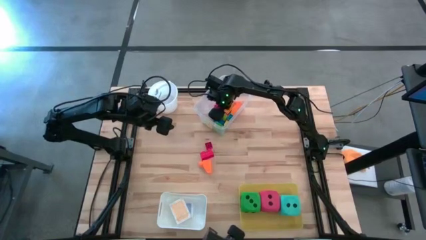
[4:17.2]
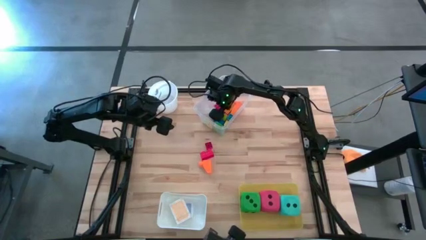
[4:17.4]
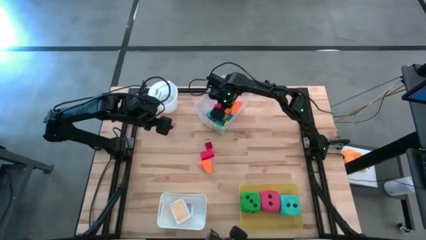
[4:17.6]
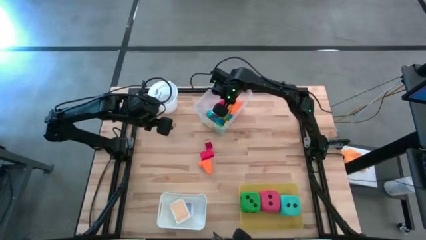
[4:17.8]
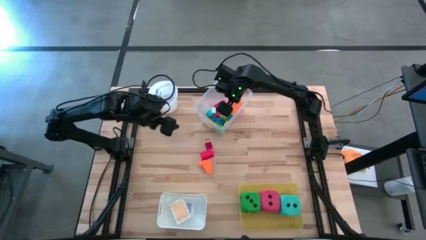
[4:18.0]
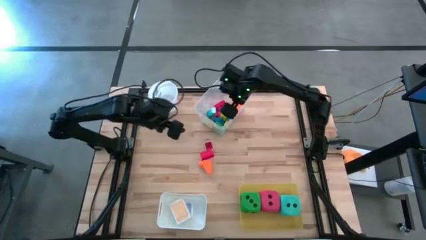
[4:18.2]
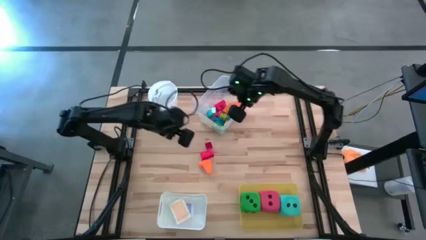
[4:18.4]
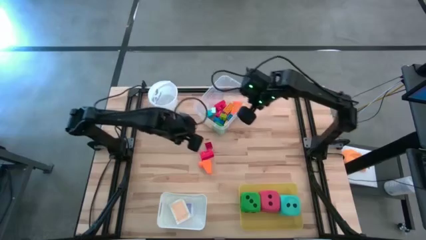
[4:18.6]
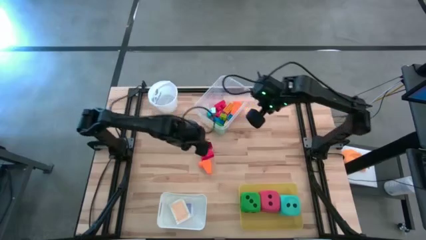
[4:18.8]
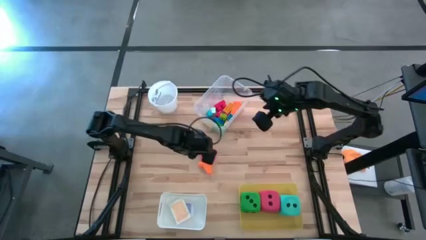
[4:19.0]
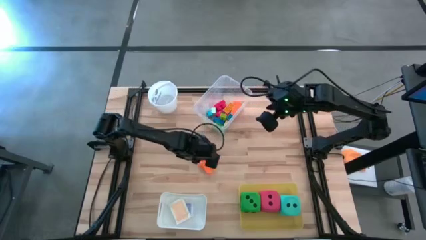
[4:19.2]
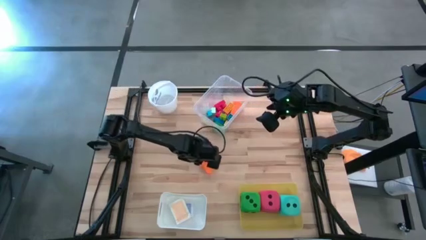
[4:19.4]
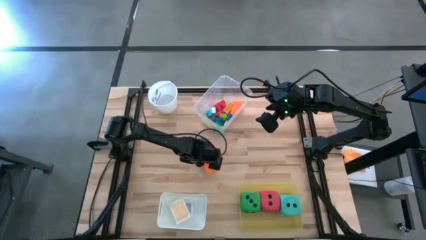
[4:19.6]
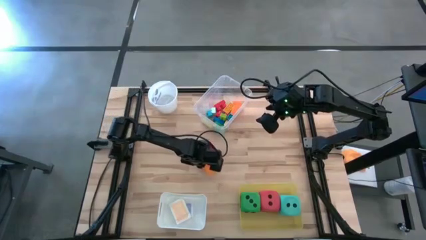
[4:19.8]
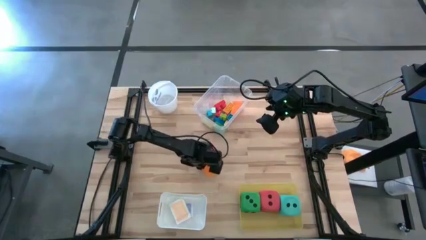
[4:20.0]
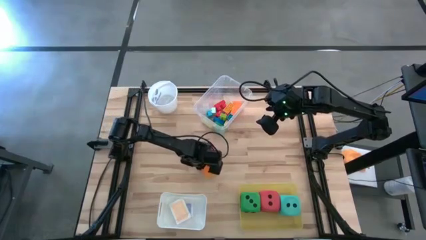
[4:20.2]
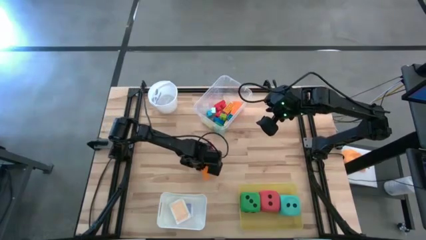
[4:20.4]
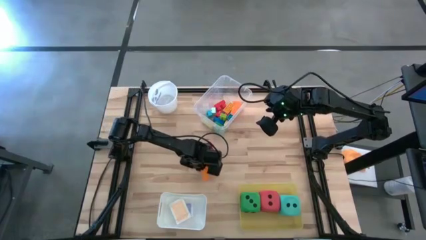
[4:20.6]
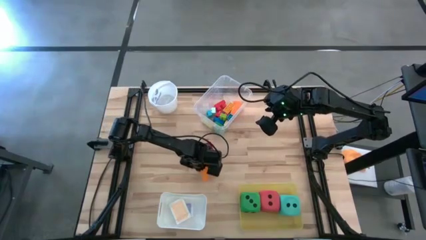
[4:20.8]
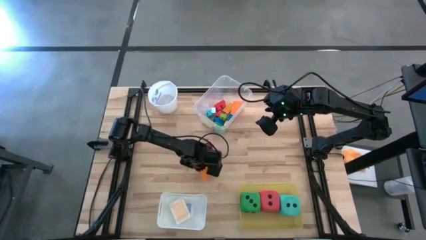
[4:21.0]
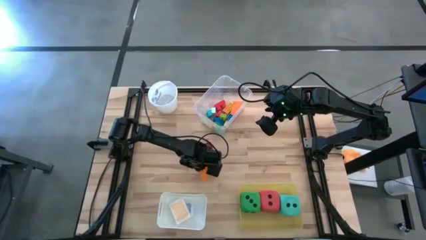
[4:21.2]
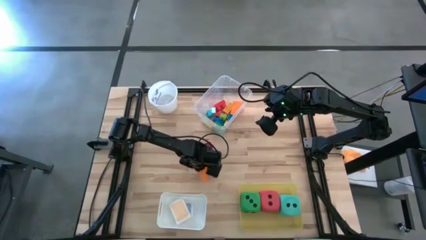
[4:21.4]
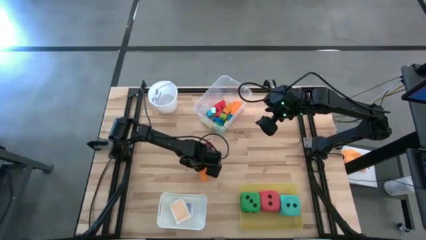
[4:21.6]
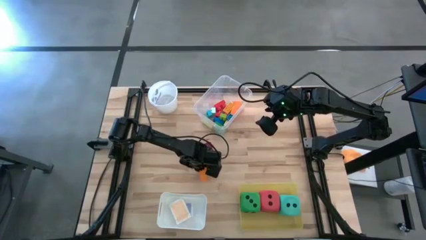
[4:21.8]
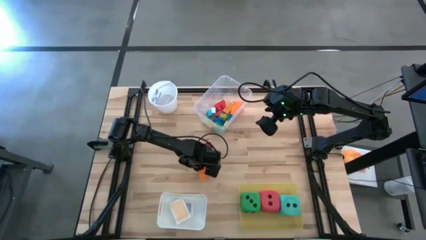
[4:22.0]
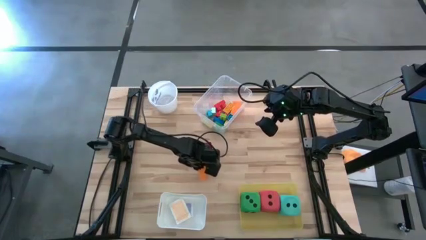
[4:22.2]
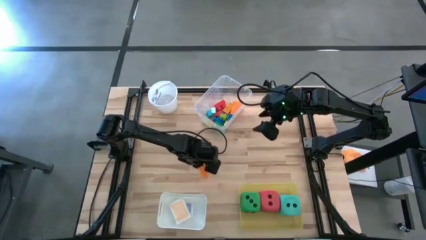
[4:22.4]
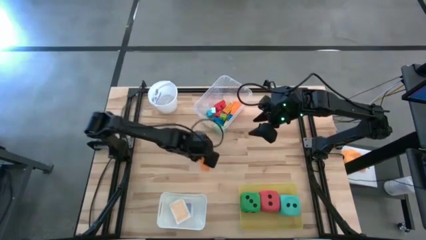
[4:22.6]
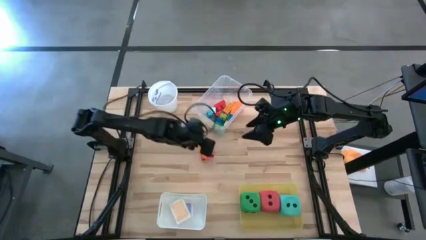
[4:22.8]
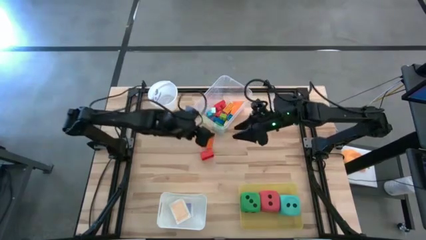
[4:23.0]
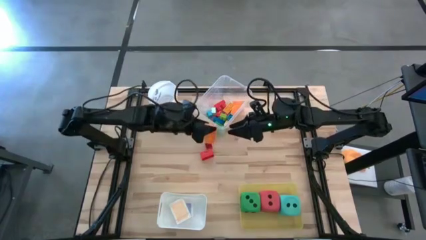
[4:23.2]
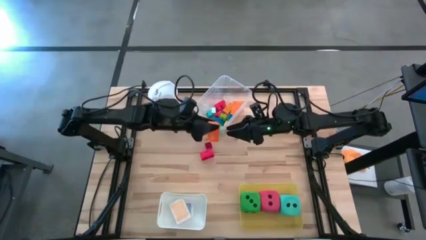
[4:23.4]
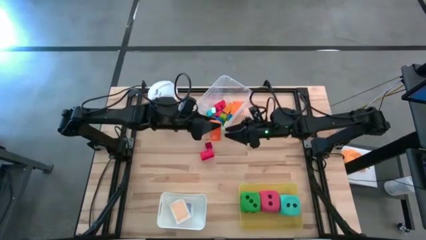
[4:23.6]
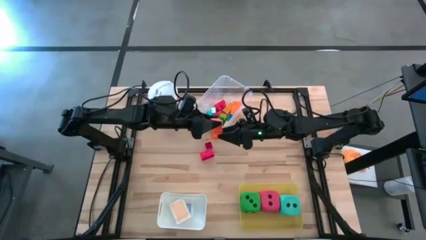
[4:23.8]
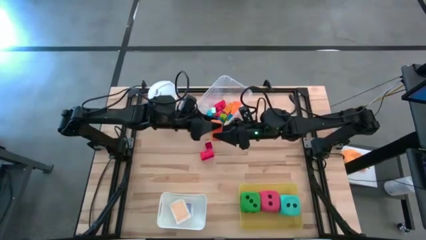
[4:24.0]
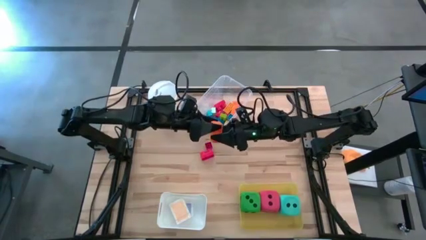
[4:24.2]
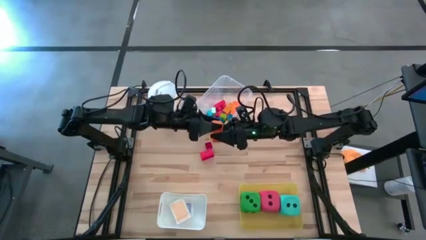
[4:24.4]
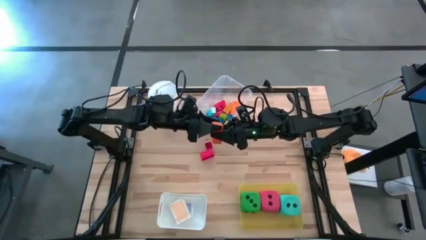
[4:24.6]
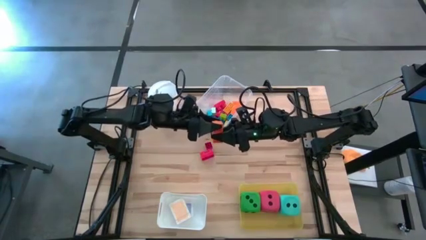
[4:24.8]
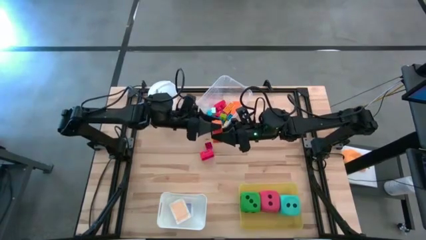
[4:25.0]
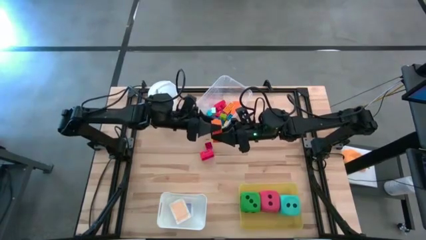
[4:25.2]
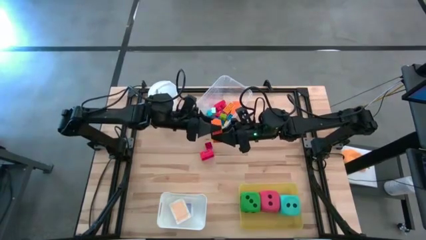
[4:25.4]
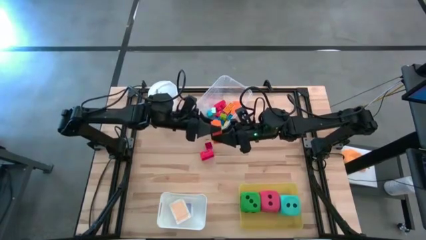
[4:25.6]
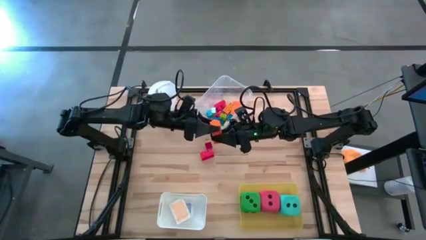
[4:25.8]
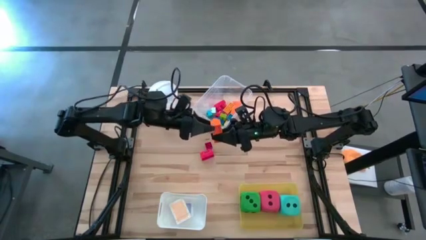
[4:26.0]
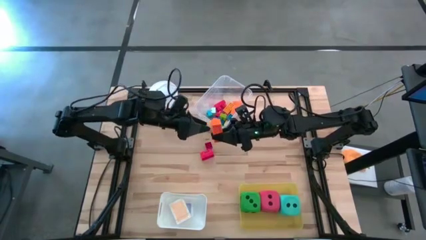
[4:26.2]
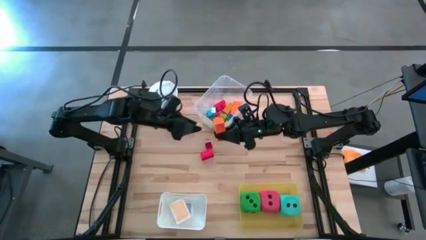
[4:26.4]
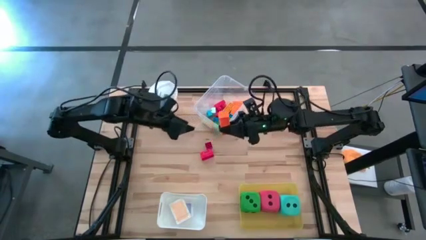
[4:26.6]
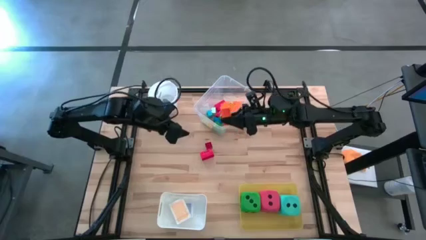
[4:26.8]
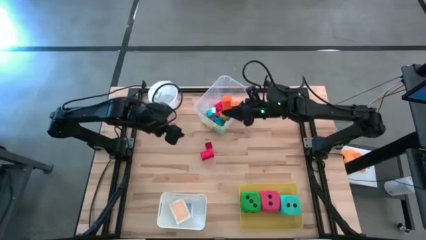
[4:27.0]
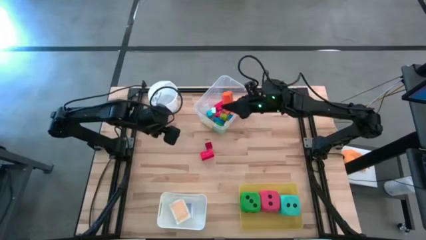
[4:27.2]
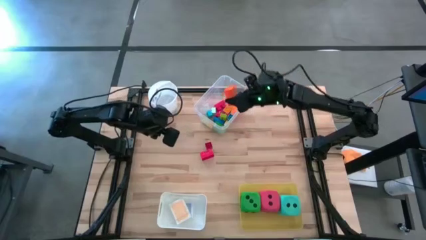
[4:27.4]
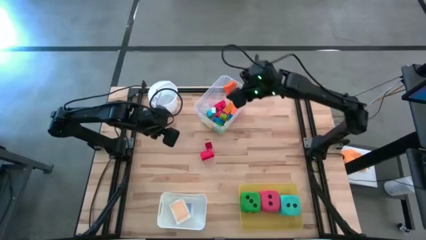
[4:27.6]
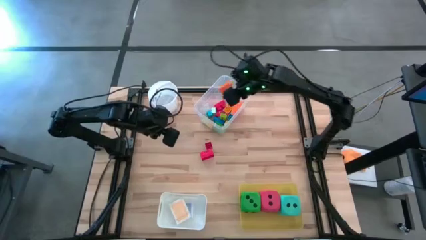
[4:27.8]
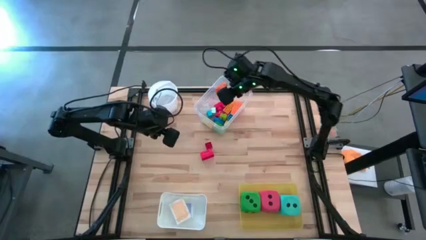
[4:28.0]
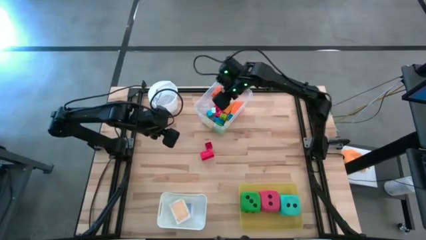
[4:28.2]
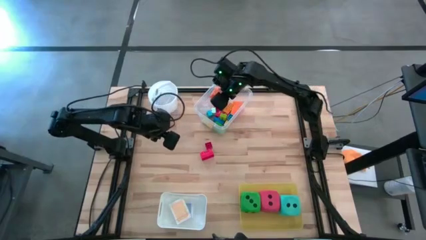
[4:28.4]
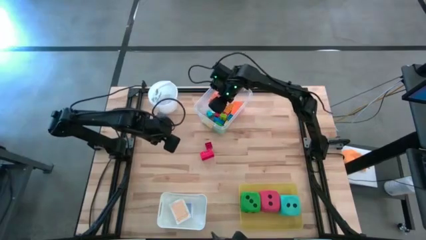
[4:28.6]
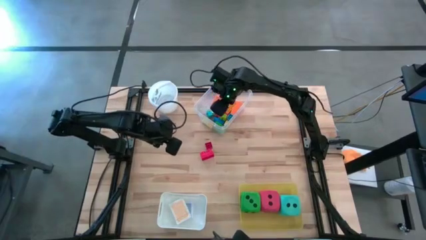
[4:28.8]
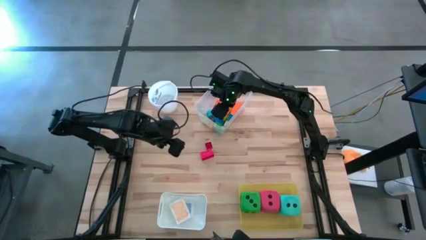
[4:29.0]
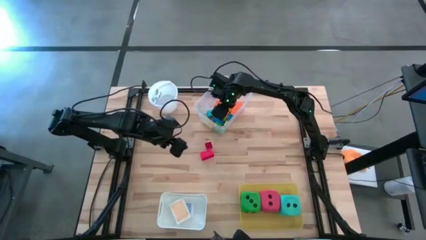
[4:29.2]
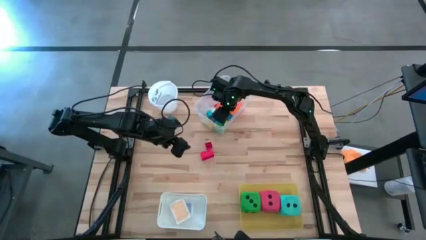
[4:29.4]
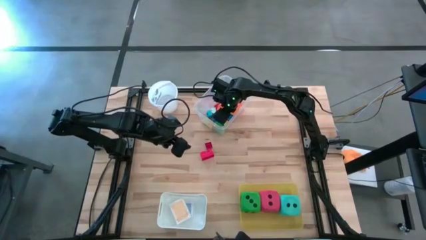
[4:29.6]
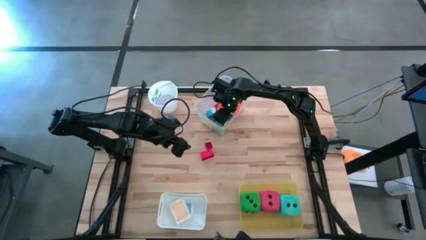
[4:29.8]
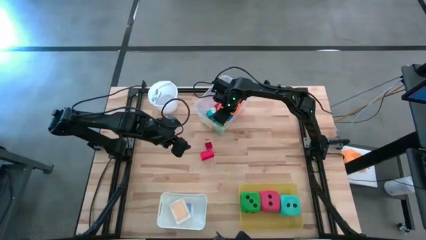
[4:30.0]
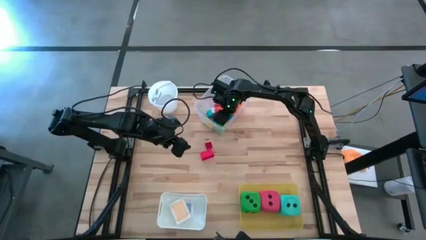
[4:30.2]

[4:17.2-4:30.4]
Task: Pick & Place Toys
Put the orange game piece into the transparent bin

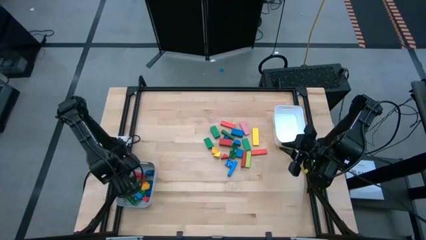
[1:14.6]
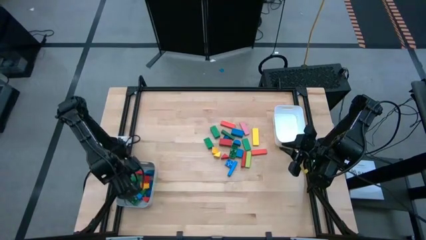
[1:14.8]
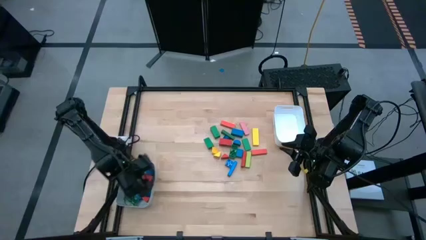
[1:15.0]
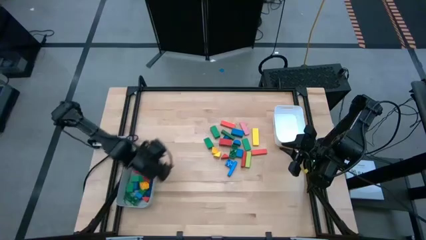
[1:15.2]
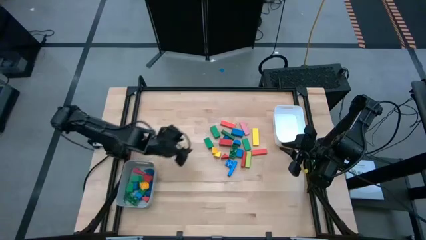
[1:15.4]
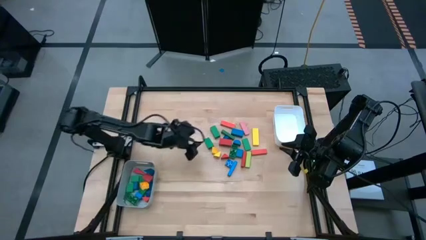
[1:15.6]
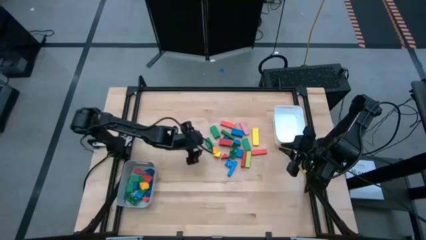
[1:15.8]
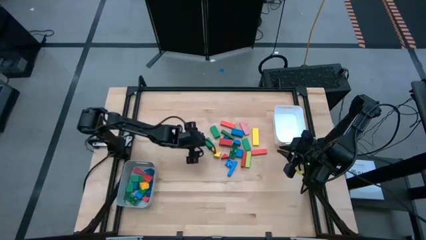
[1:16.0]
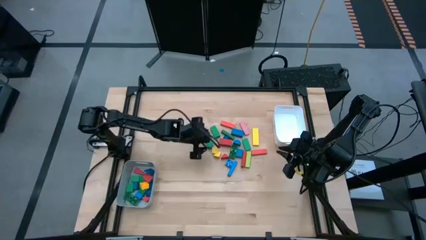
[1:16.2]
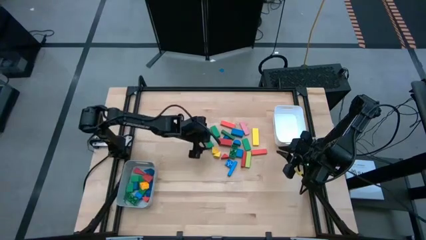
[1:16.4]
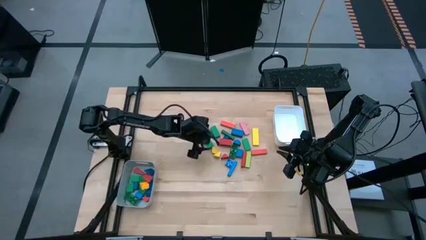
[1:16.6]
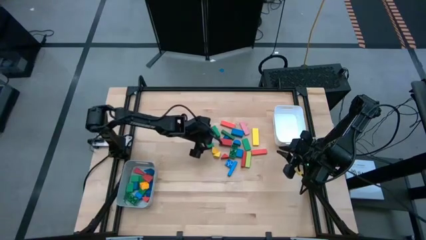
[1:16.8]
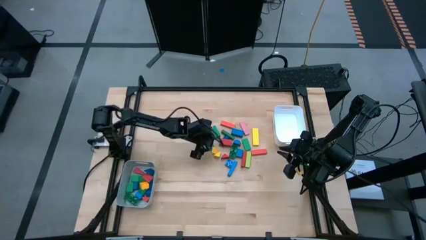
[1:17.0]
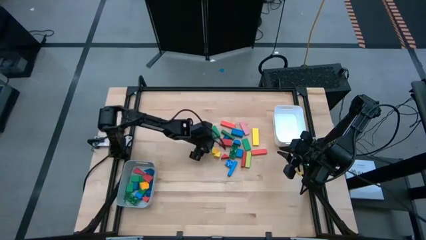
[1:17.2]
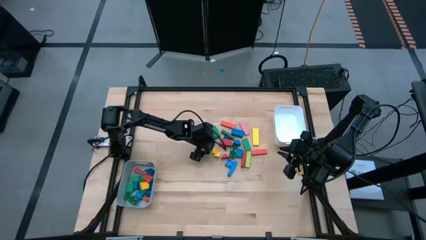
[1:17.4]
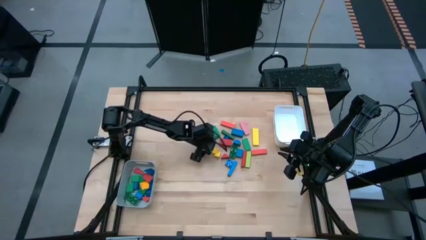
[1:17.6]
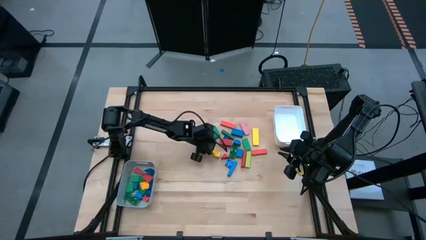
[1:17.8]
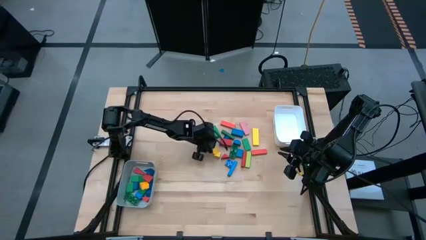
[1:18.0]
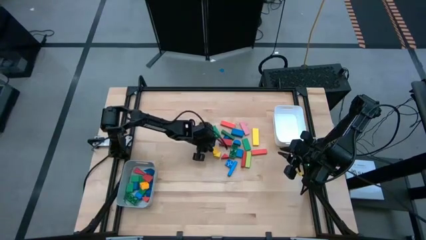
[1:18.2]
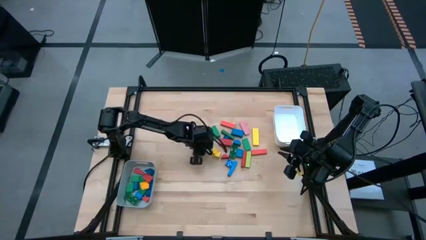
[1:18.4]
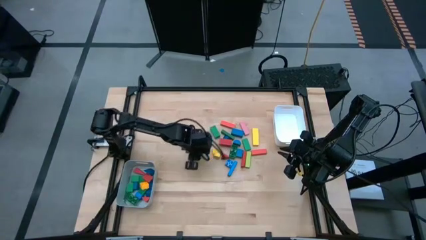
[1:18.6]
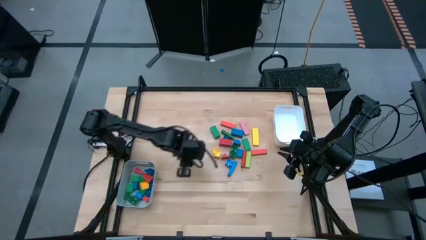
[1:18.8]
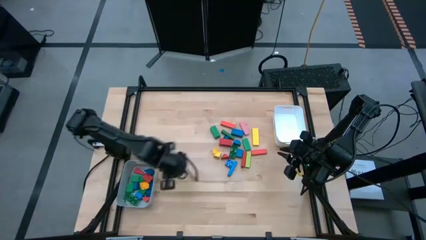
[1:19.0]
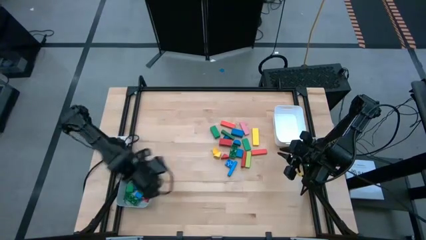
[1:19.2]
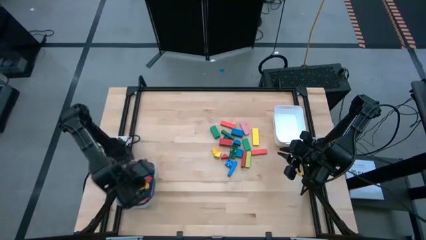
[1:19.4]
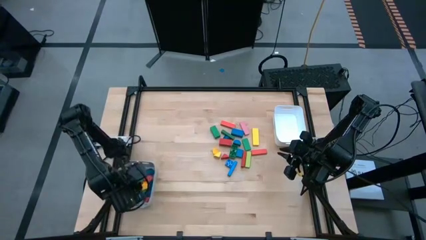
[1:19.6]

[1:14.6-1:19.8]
Task: Sort blocks by size
Put the green triangle block into the gray bin
